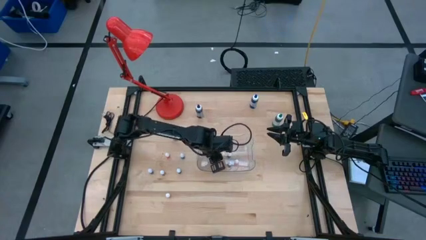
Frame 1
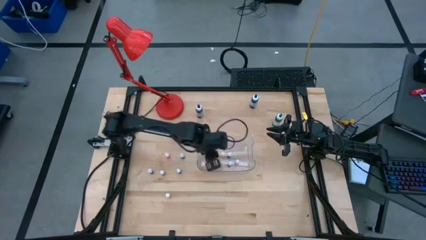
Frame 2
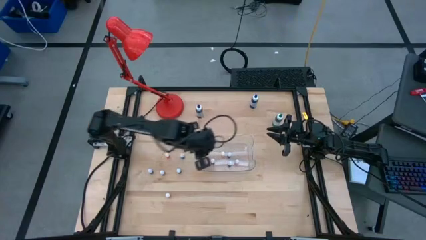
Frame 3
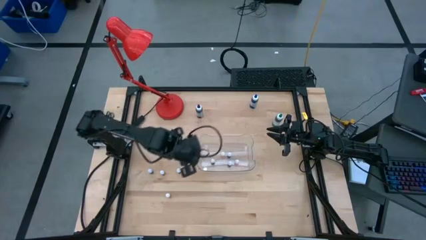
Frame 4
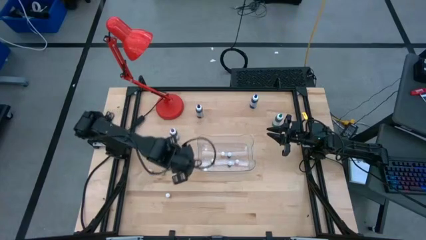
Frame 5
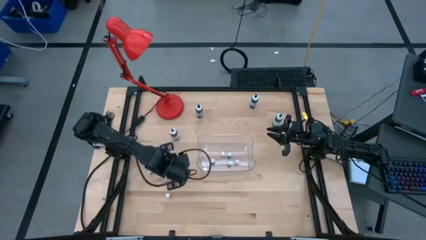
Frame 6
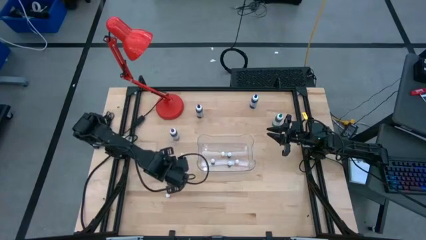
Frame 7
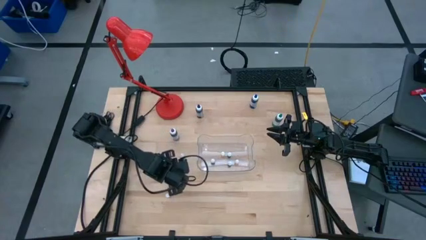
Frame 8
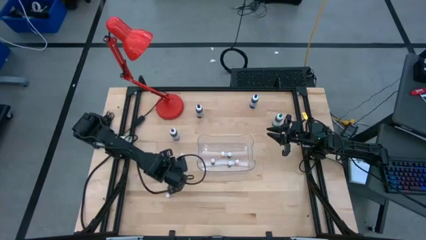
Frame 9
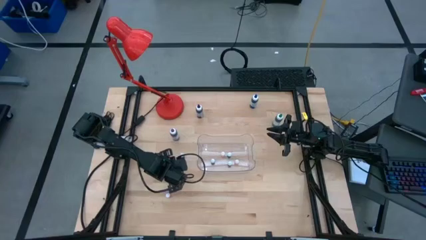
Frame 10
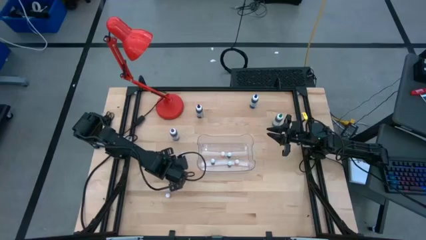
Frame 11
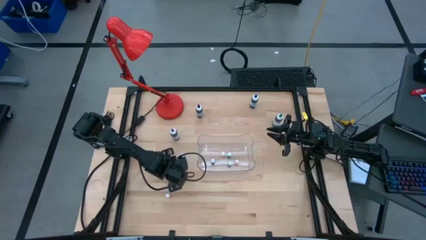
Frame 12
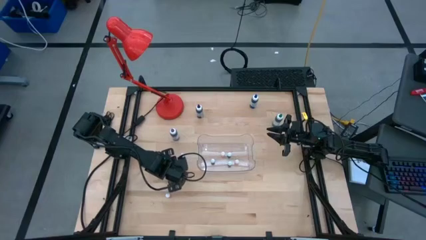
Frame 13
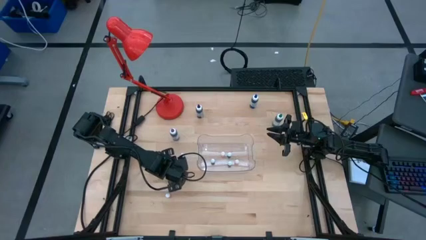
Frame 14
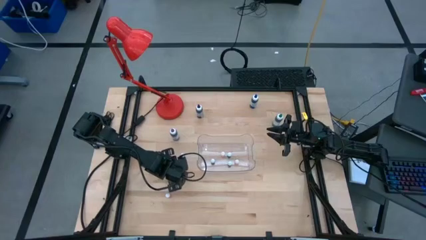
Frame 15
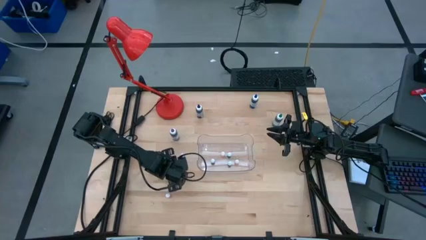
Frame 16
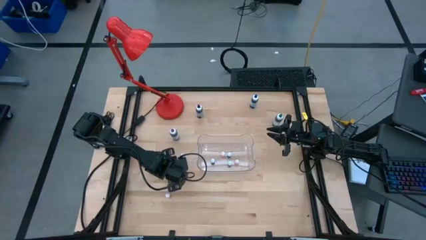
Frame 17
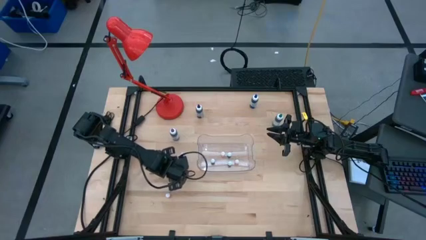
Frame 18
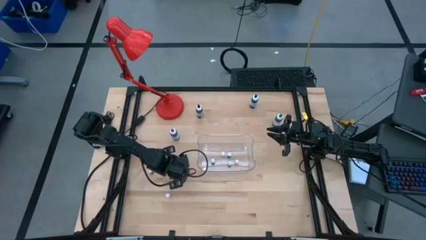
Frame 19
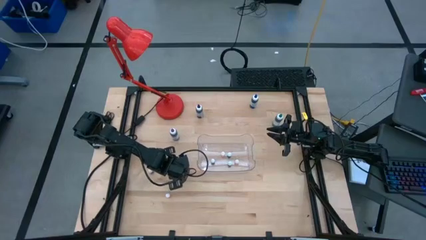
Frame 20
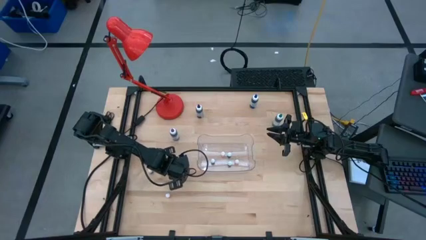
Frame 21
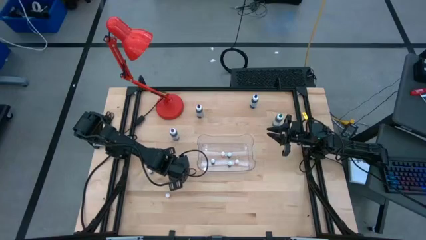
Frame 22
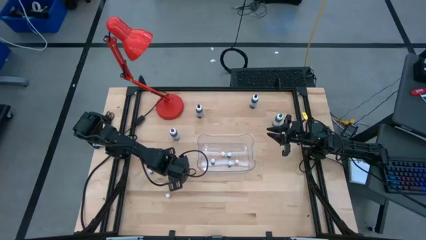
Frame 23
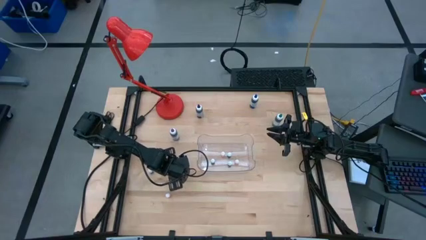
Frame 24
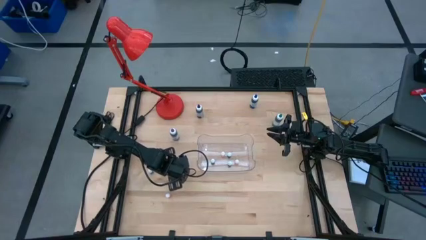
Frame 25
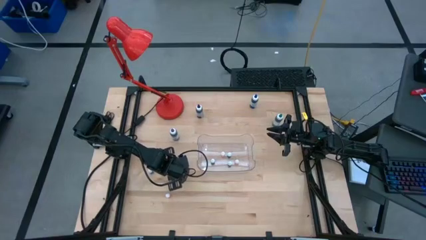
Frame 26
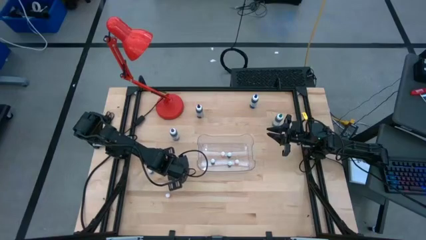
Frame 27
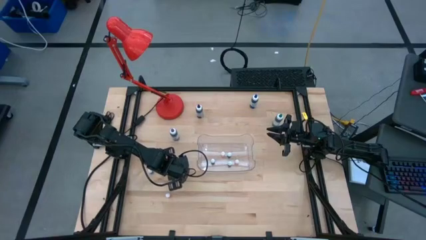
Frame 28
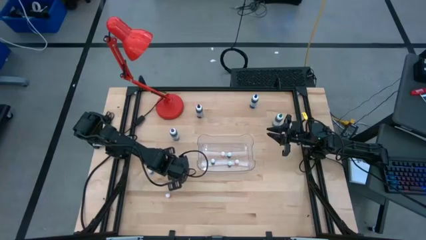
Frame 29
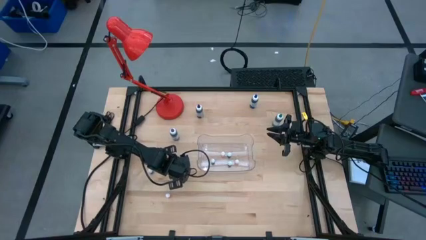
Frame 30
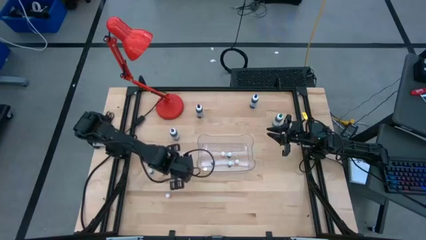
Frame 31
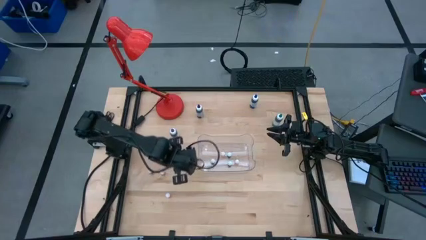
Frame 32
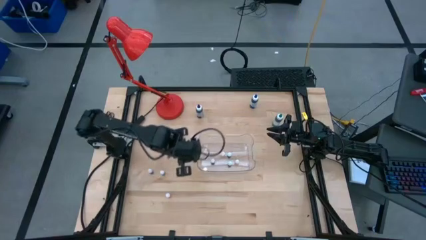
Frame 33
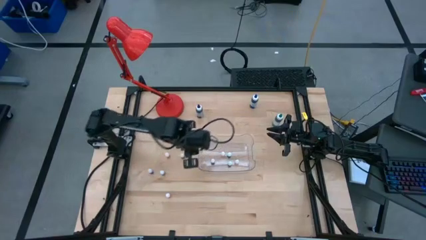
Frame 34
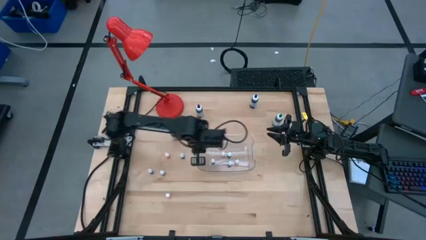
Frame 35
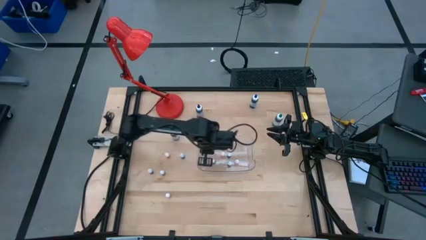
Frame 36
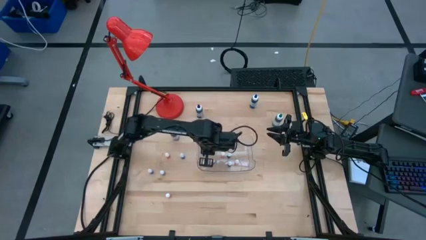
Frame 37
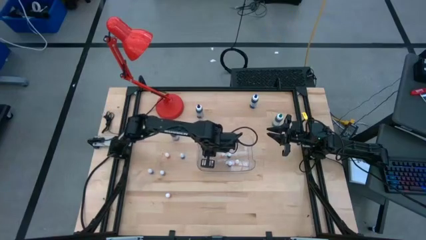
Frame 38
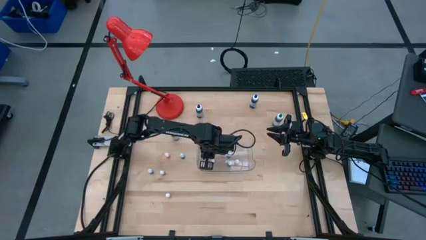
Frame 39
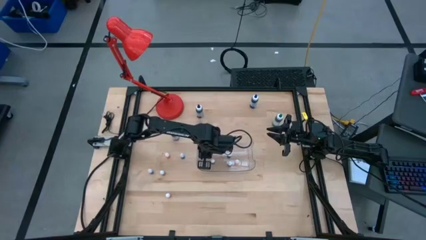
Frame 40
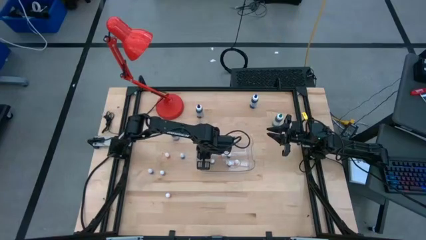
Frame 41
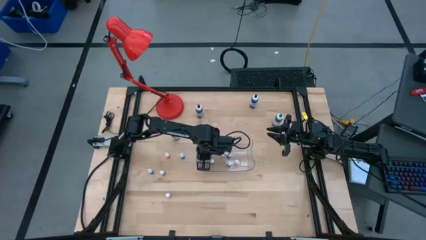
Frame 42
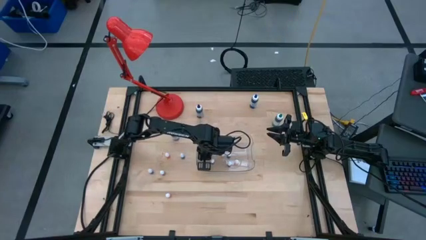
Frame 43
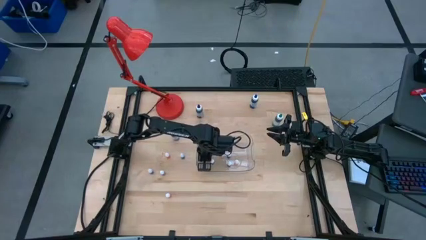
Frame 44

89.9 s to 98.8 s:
Task: Pick & Place food coloring
Put the right small blue food coloring bottle into the transparent bin

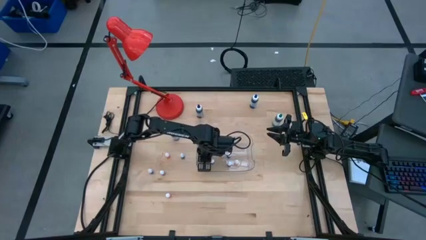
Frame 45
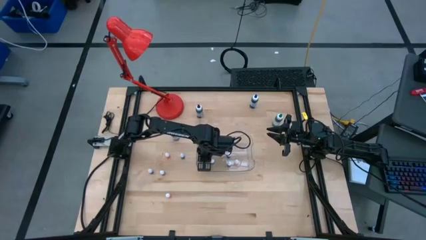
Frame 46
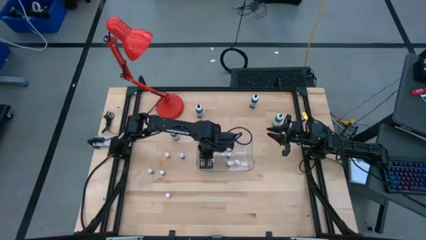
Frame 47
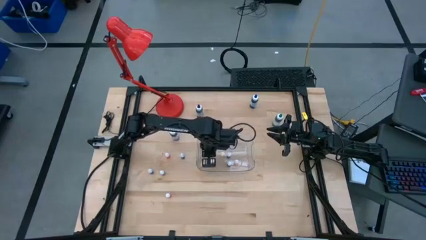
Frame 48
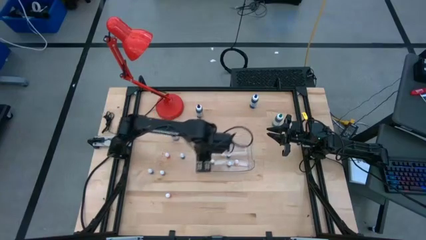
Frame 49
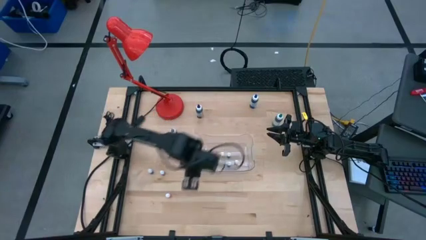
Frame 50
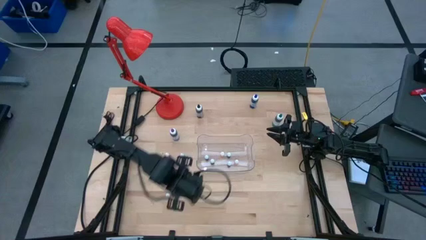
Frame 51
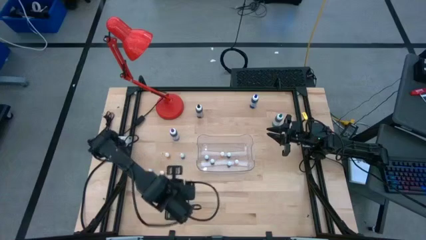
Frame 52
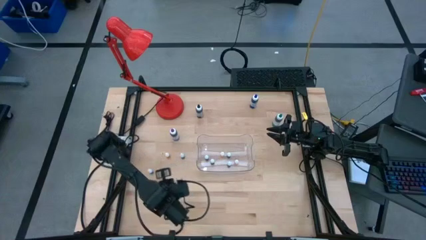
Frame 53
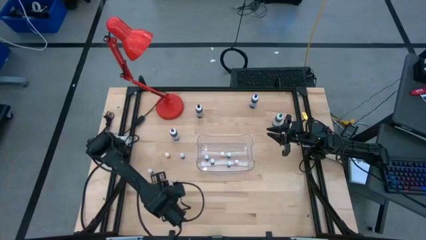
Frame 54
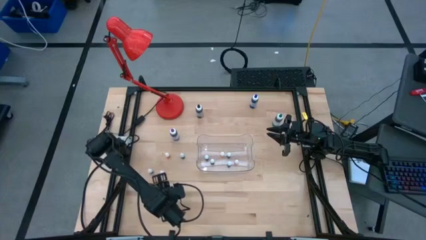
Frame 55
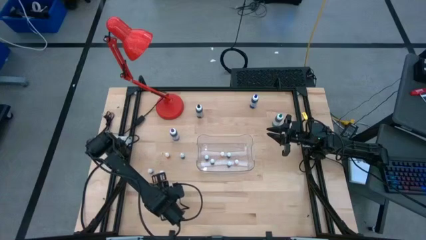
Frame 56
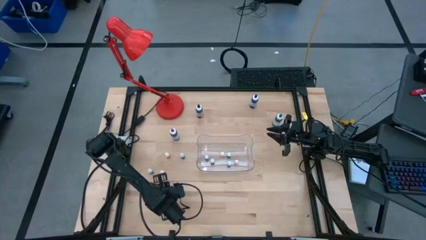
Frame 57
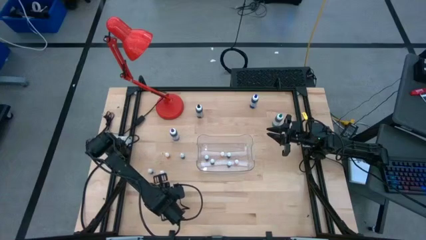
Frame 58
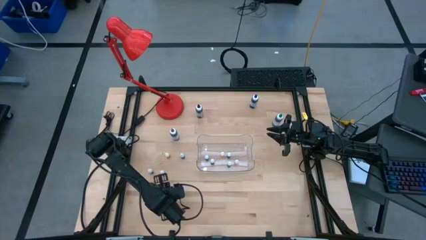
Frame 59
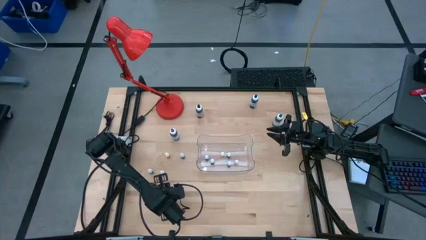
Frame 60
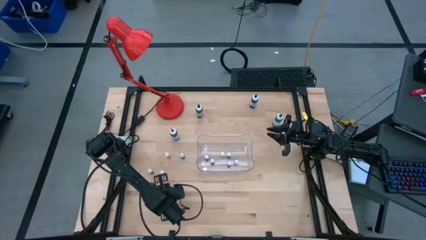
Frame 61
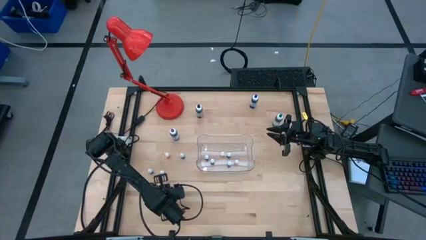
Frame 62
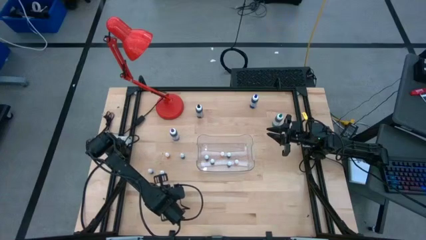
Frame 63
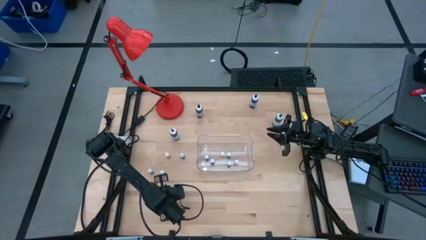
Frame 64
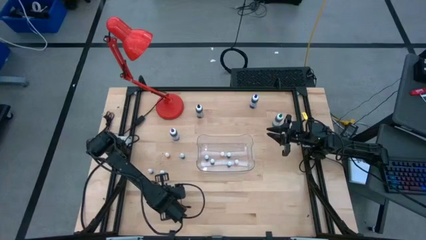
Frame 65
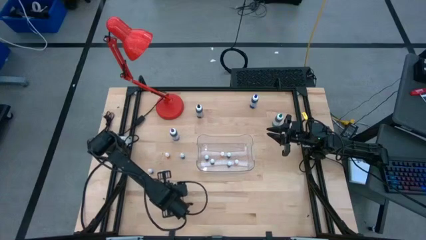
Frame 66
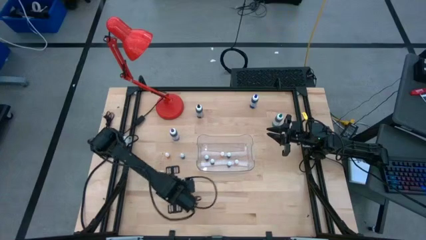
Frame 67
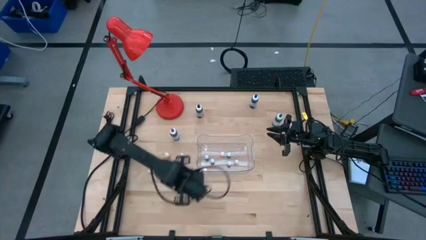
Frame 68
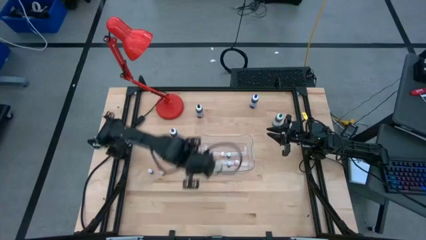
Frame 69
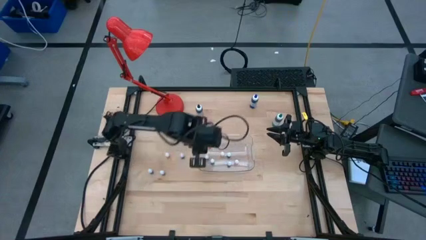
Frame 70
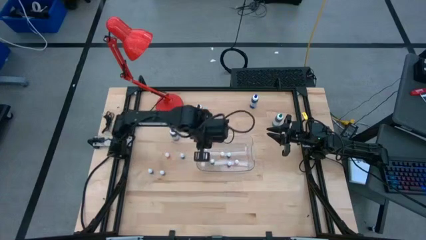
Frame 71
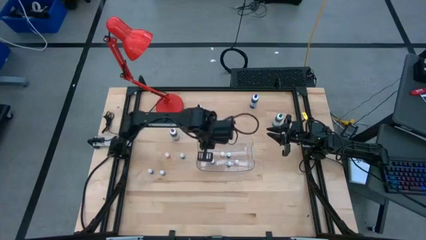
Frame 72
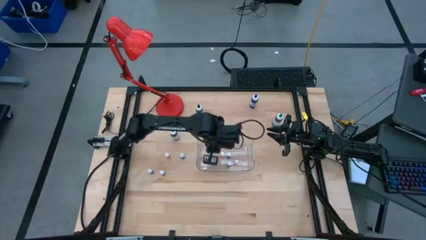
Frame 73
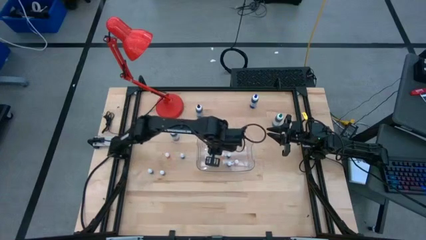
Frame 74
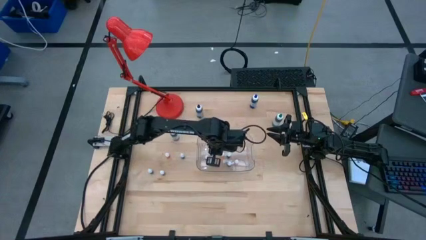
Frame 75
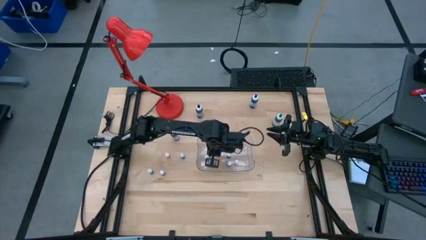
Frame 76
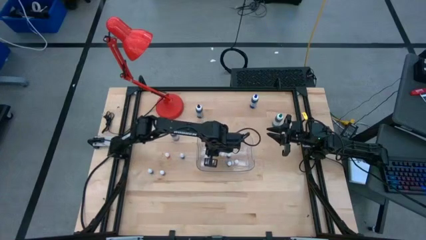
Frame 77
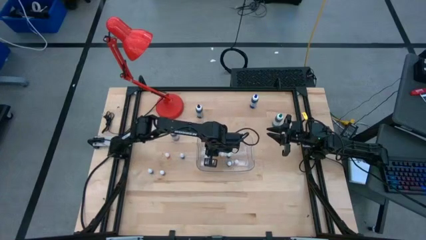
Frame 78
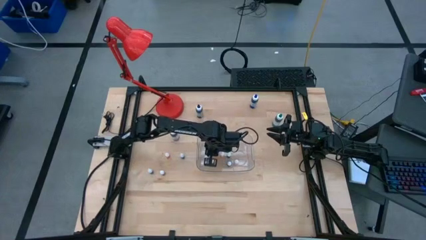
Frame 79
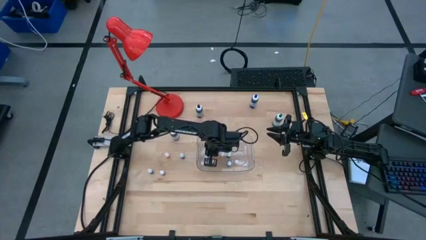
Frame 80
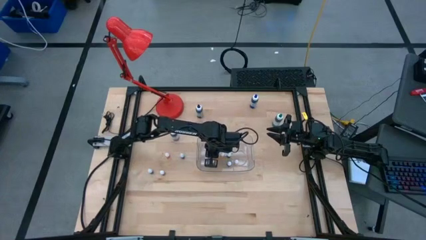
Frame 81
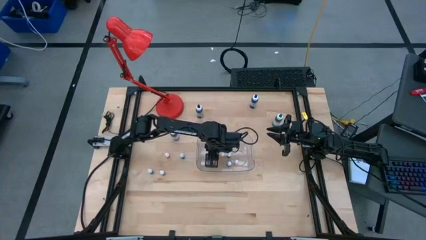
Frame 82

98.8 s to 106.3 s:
Put the bottom small orange food coloring bottle into the transparent bin
